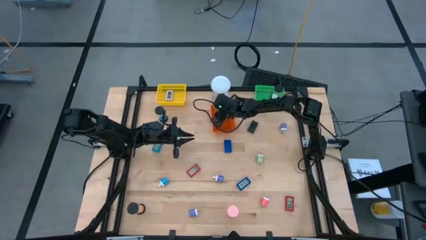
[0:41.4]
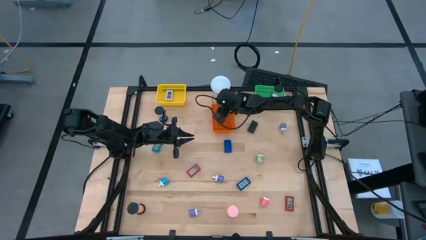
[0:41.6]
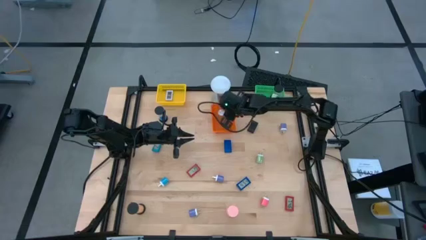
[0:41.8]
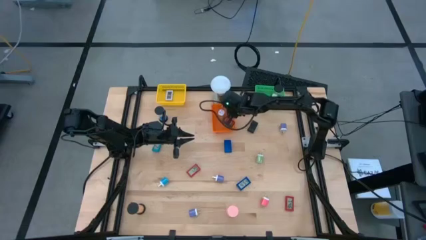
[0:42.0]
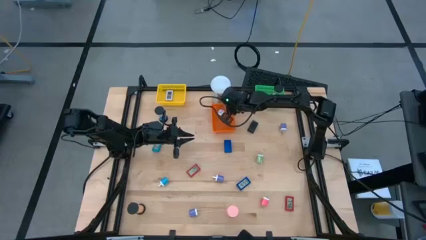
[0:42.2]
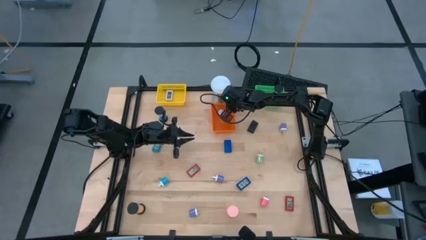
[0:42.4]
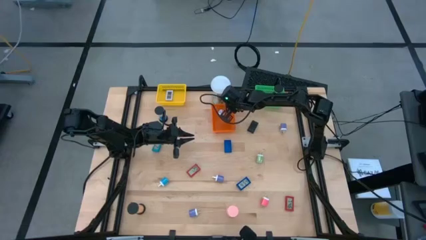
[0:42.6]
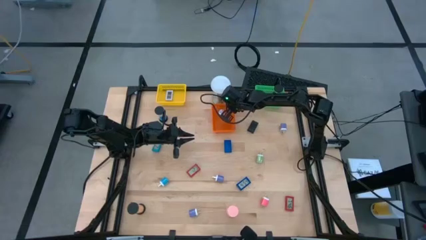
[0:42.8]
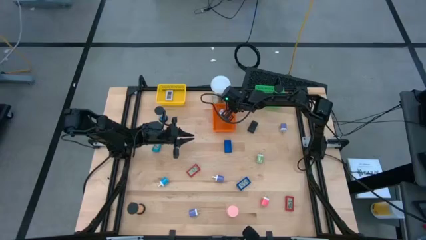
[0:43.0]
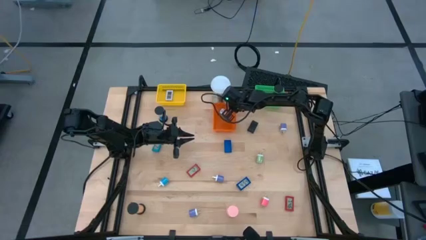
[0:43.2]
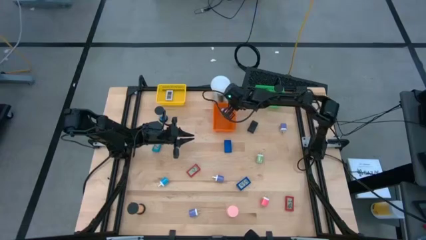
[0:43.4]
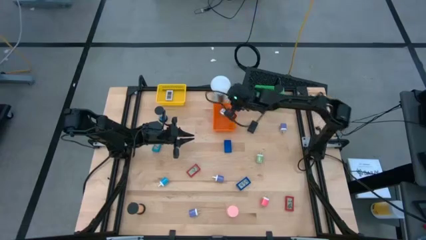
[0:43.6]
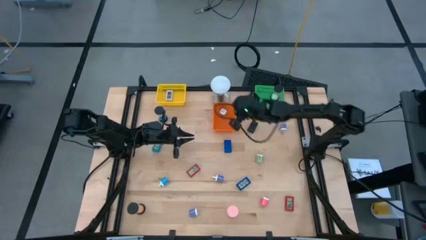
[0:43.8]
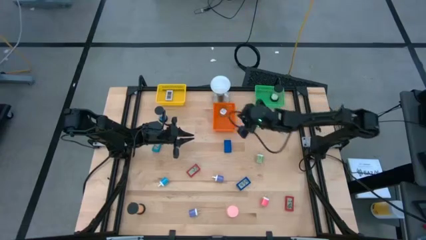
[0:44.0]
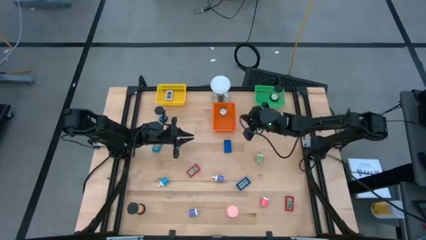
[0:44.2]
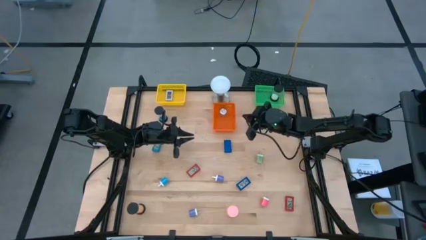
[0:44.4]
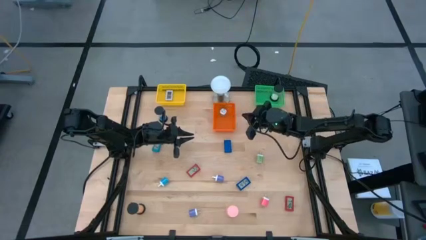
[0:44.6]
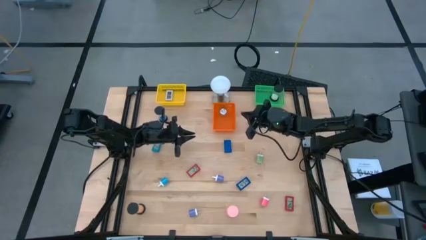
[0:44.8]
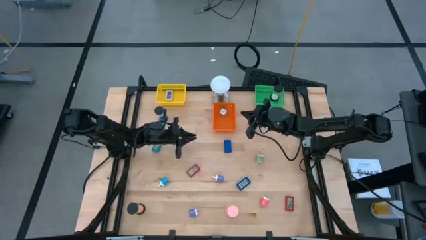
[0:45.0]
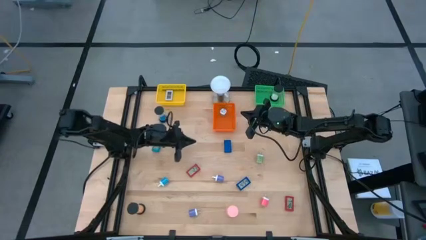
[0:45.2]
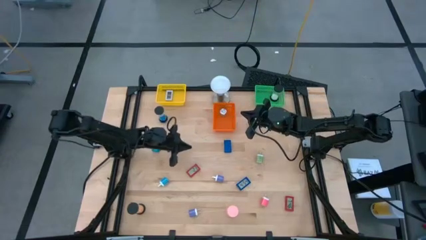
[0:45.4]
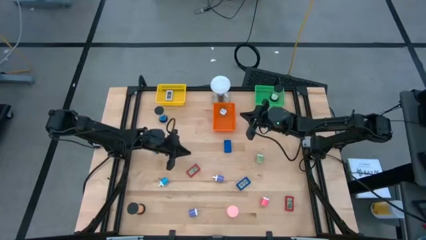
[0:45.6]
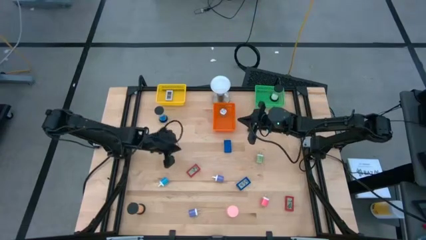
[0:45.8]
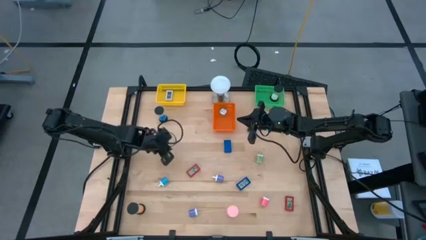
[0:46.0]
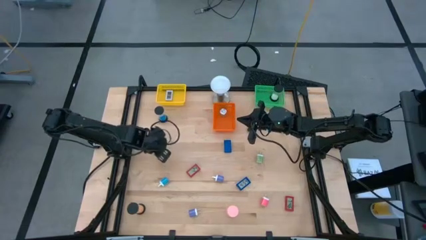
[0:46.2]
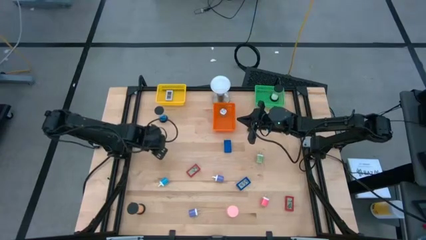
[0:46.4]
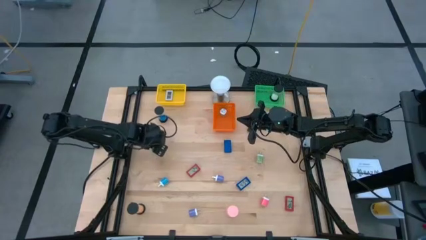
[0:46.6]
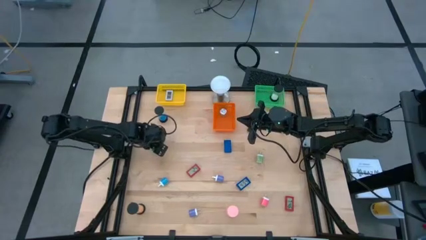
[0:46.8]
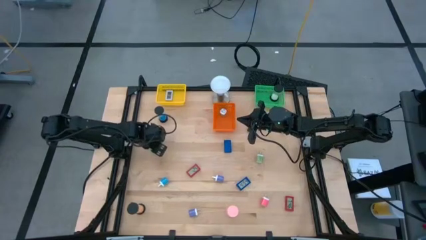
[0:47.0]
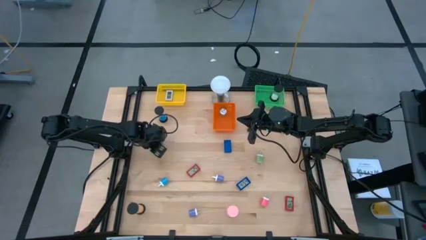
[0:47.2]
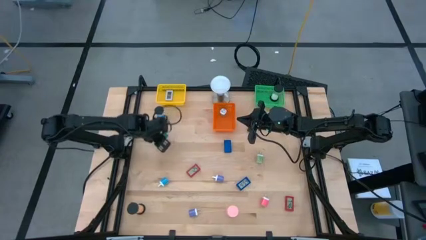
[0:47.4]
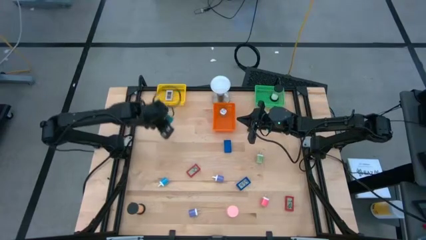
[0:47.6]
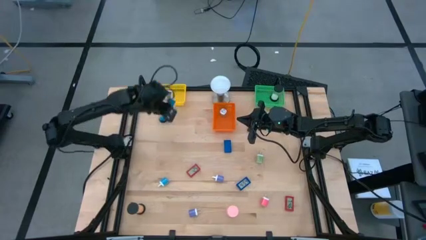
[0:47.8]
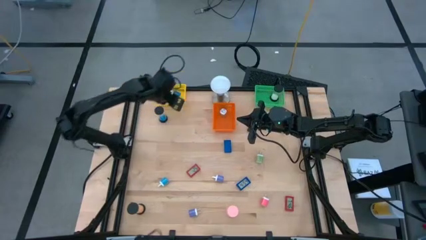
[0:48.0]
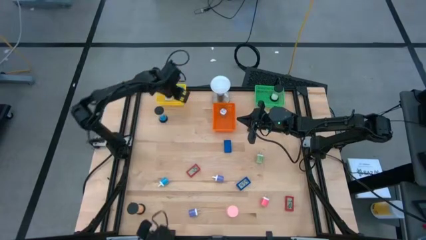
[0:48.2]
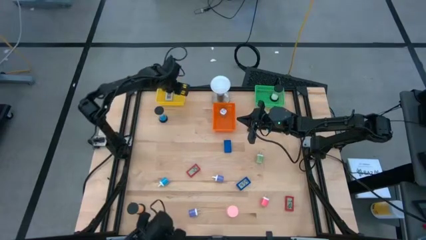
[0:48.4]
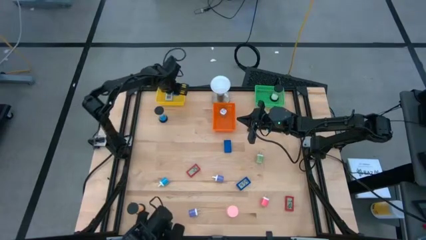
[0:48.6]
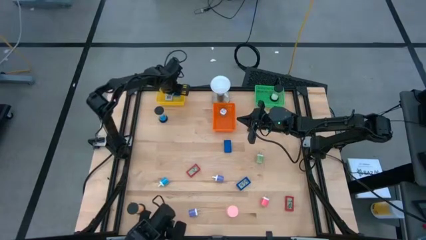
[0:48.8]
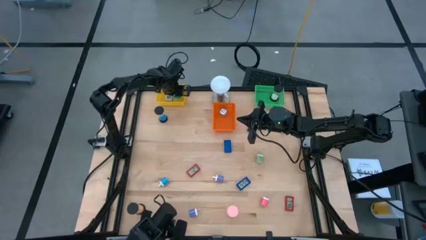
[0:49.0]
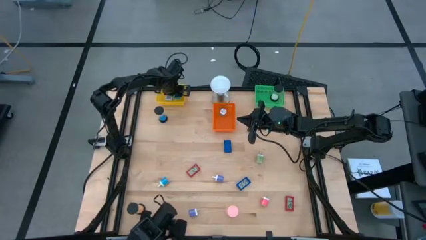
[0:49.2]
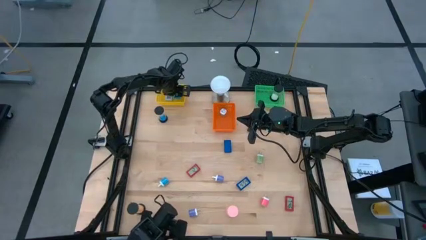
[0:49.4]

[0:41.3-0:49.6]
Task: Pick & Place Office items
Put the light blue digital clock into the yellow bin

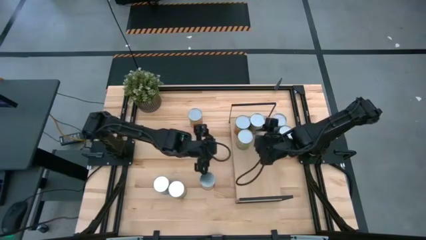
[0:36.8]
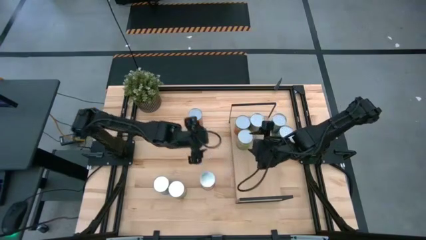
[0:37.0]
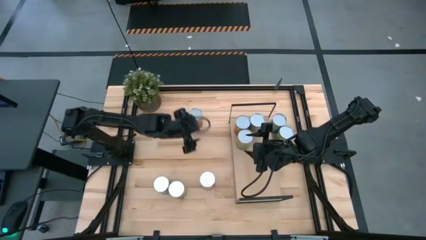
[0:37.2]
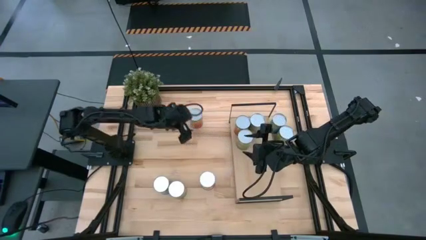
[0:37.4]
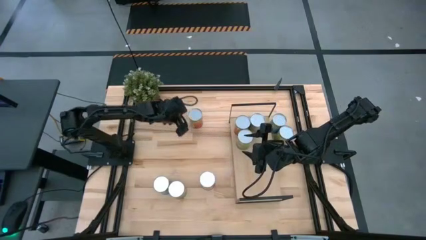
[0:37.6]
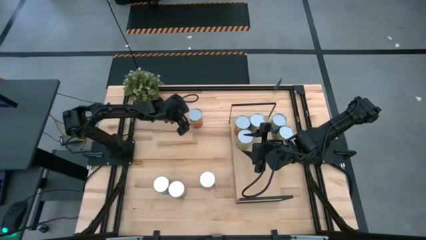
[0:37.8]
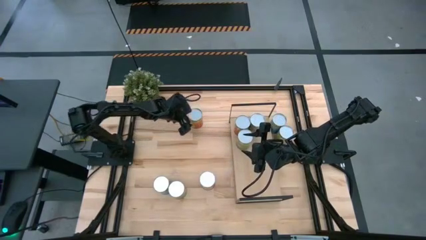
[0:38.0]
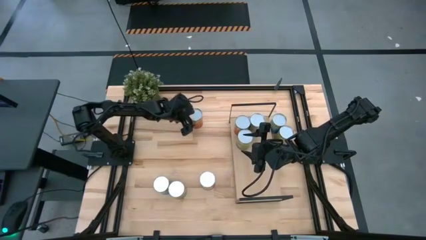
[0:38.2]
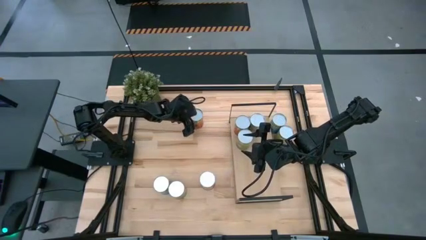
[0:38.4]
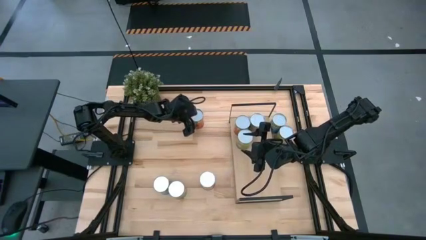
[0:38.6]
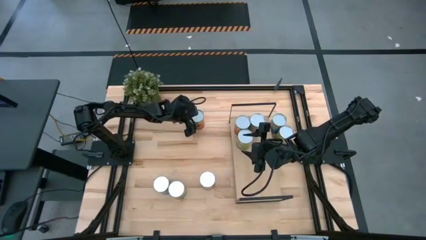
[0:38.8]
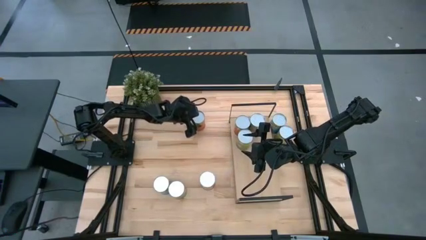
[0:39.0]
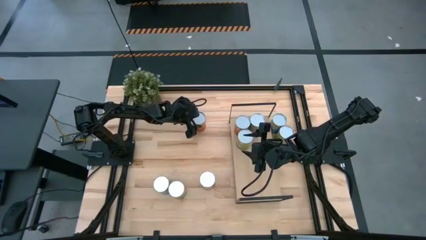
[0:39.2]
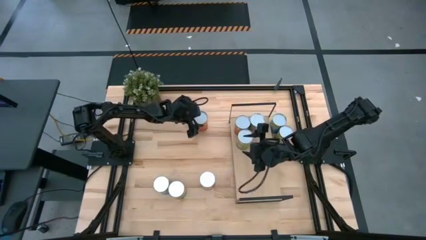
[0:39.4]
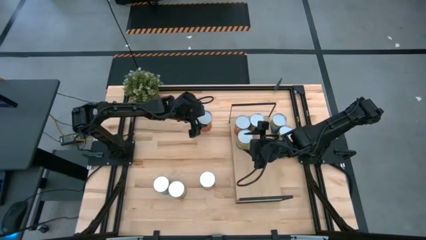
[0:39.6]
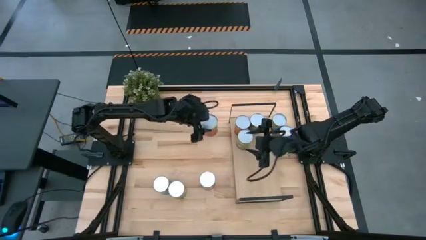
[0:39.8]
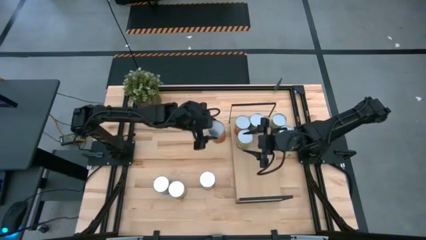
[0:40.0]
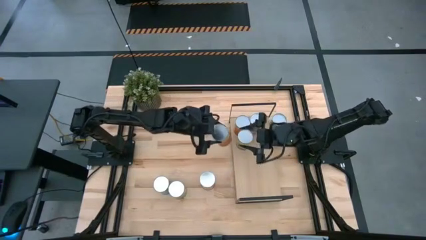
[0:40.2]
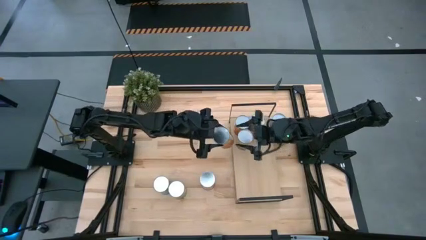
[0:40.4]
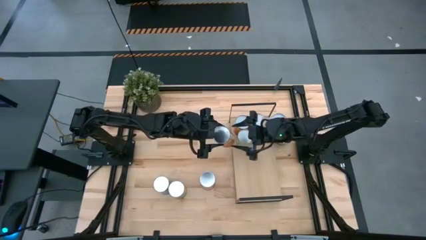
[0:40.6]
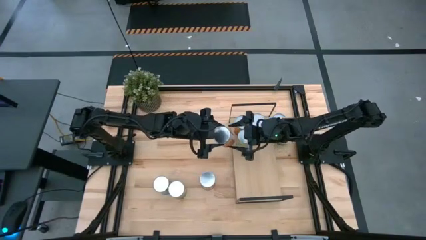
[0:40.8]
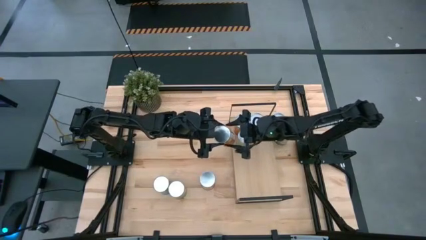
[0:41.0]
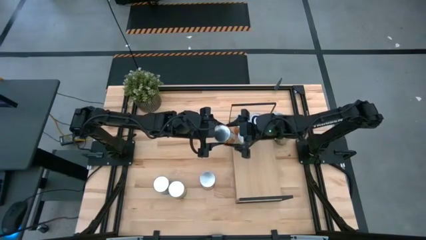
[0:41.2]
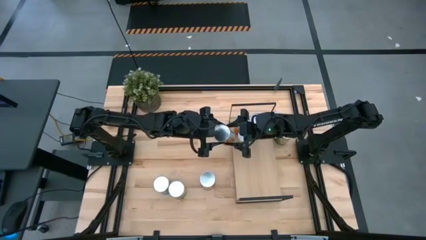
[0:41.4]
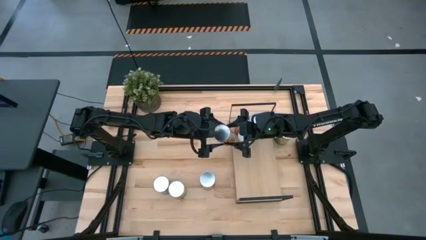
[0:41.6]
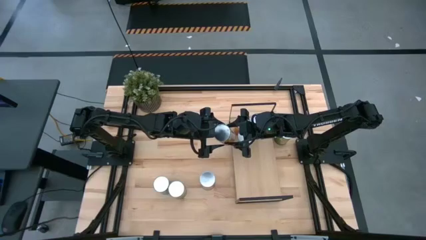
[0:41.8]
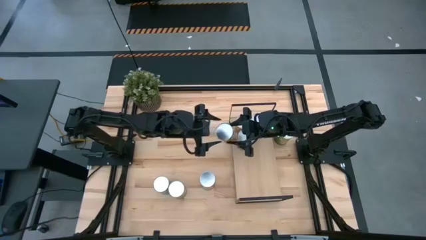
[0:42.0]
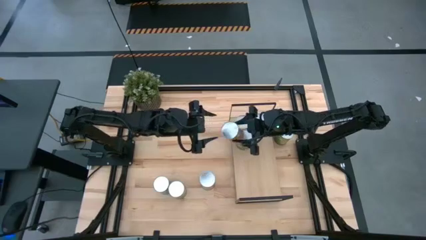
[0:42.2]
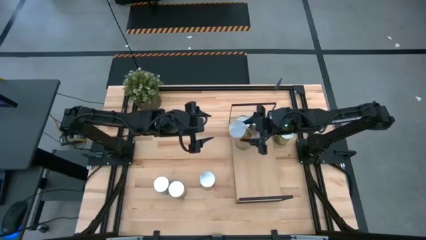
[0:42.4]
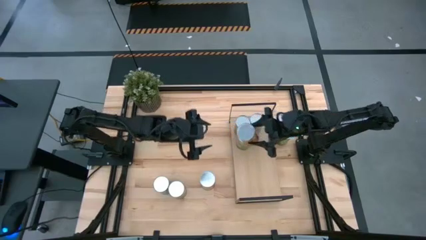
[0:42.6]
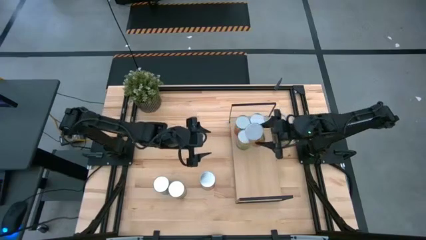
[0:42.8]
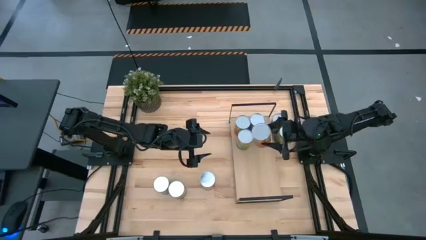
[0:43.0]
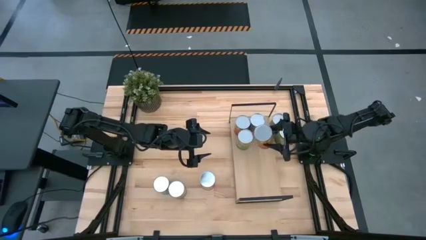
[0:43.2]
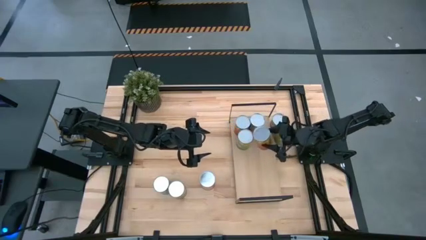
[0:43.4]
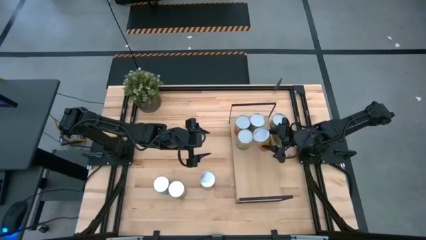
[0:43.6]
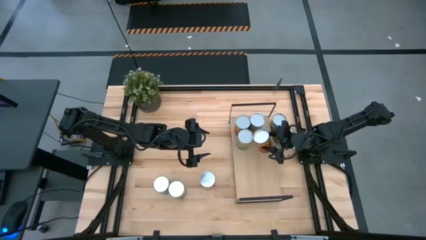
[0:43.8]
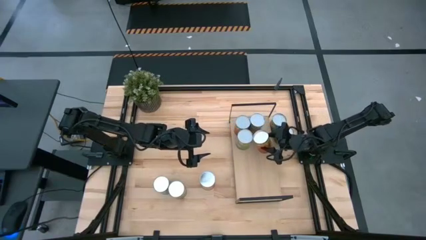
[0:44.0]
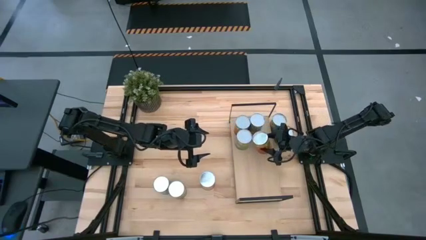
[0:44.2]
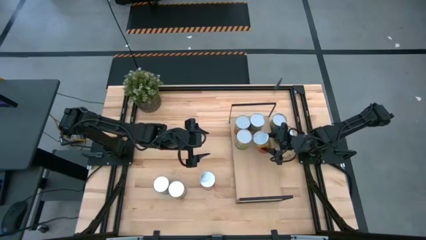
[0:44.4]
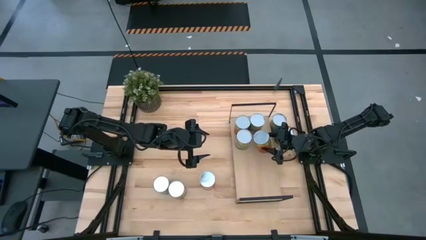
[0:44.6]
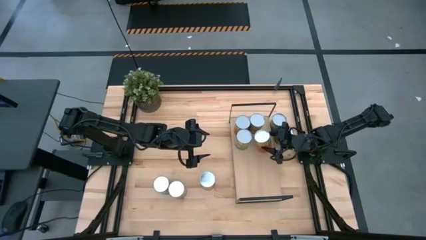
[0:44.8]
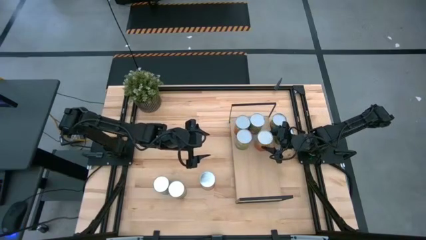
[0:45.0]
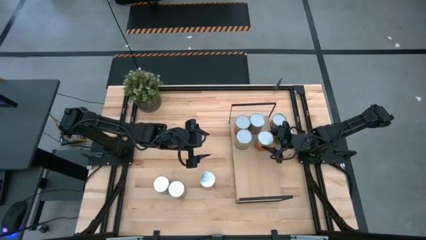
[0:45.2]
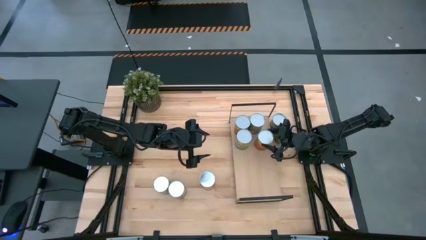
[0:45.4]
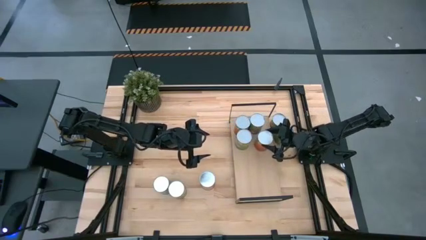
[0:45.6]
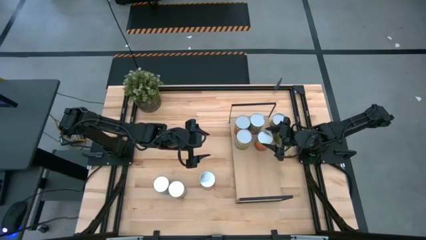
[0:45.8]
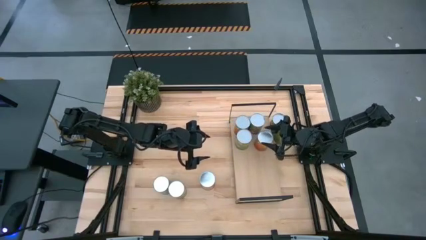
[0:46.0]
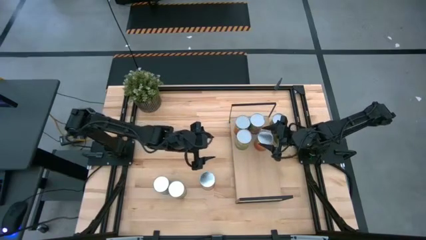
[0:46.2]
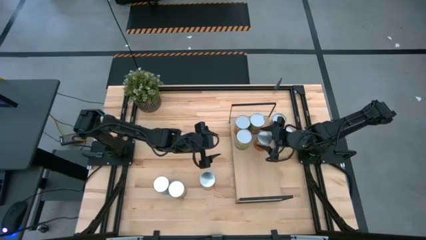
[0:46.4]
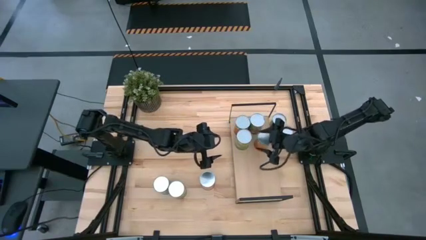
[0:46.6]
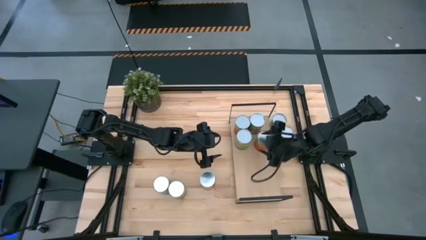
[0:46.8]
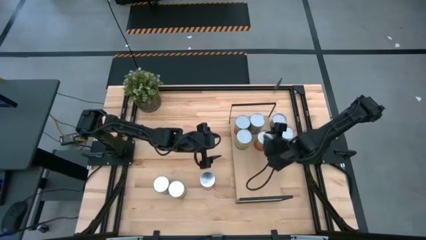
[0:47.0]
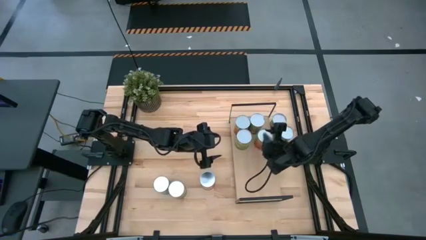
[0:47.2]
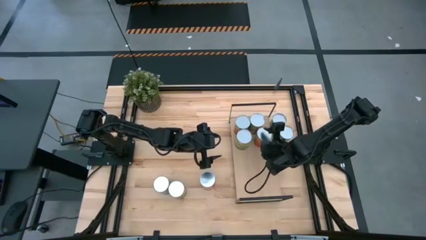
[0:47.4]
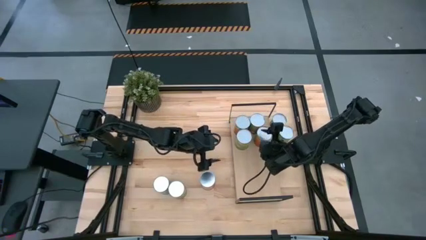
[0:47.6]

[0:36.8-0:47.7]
Task: Pick and place cans onto a shelf
Put the canned pineapple on the shelf
